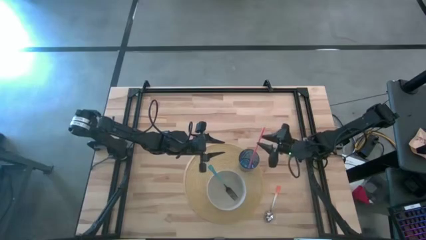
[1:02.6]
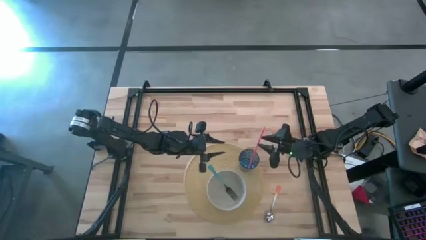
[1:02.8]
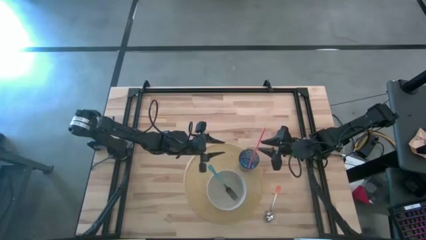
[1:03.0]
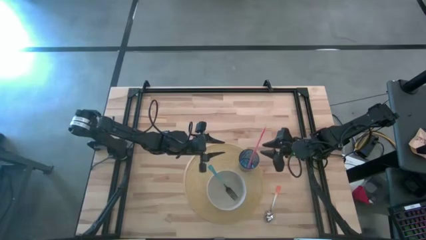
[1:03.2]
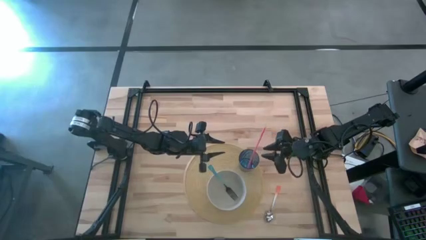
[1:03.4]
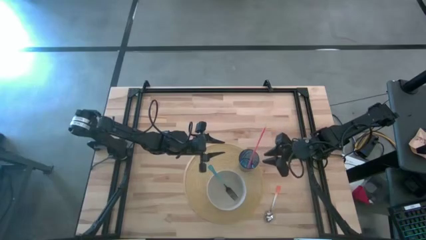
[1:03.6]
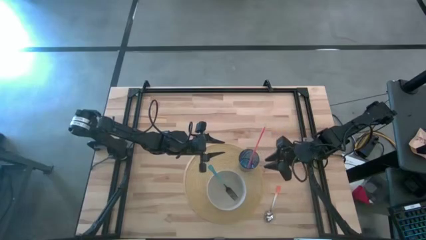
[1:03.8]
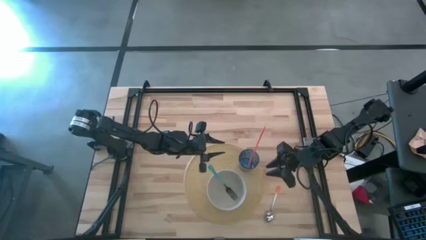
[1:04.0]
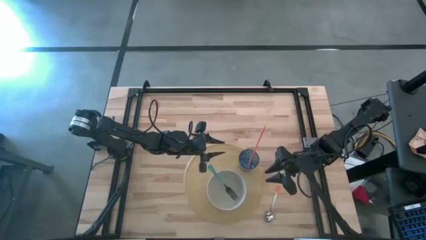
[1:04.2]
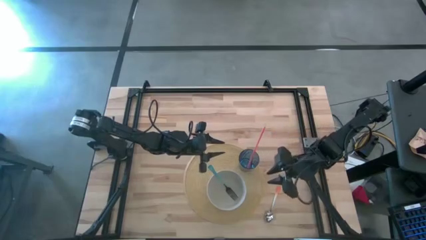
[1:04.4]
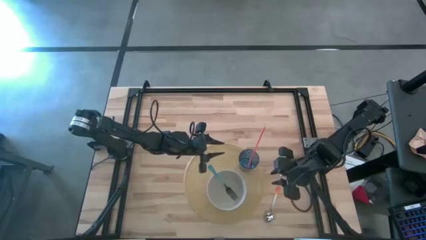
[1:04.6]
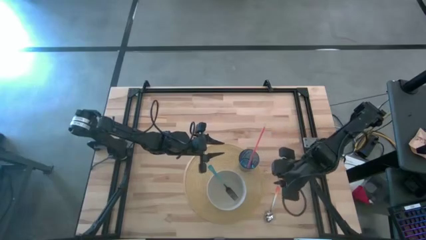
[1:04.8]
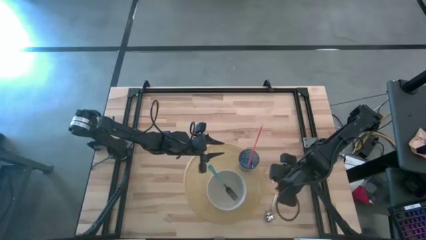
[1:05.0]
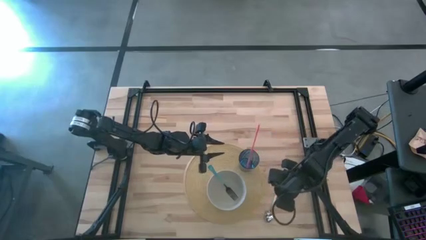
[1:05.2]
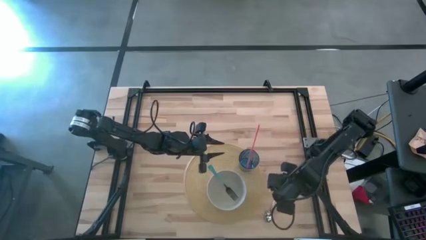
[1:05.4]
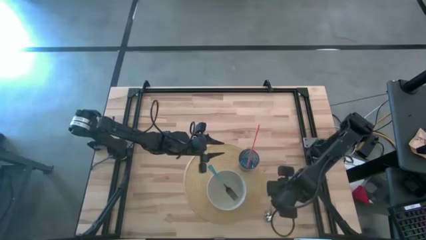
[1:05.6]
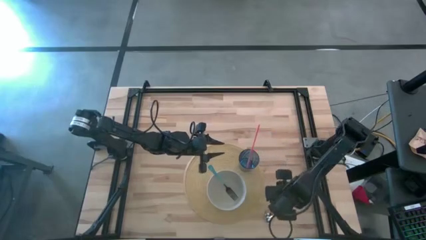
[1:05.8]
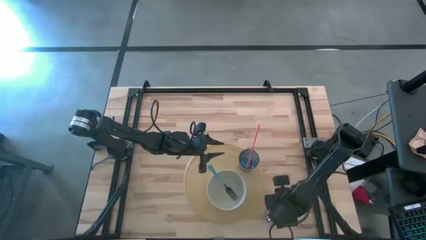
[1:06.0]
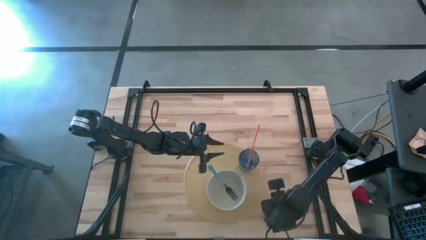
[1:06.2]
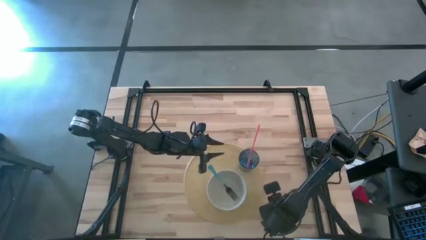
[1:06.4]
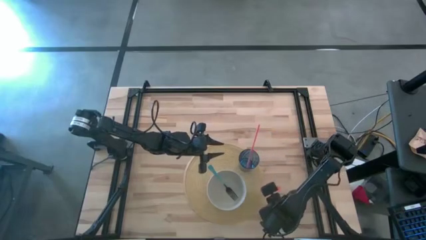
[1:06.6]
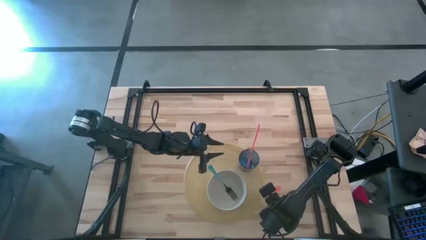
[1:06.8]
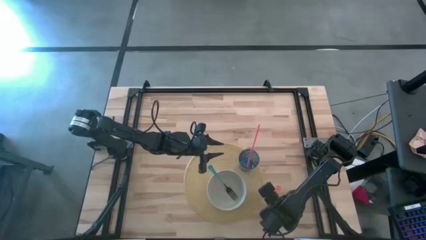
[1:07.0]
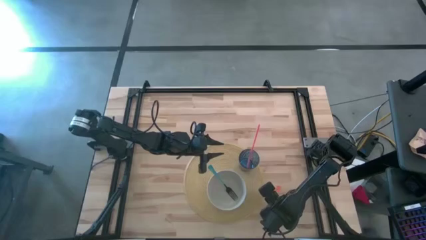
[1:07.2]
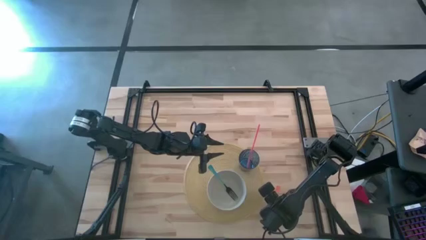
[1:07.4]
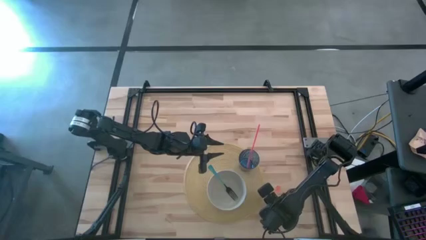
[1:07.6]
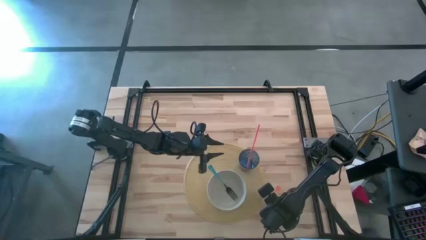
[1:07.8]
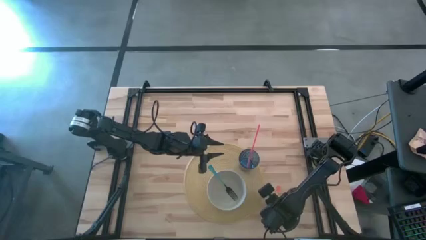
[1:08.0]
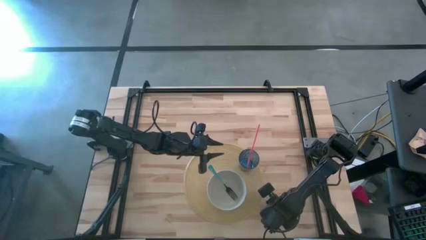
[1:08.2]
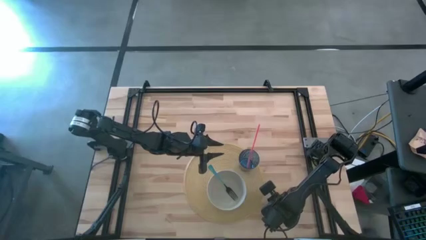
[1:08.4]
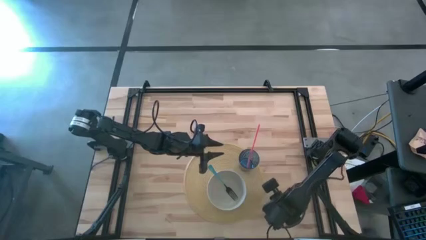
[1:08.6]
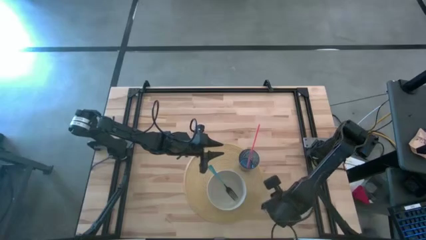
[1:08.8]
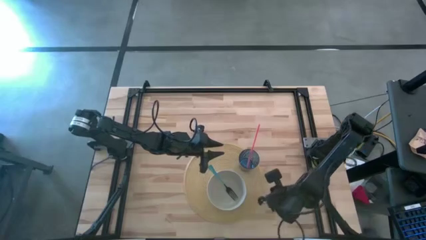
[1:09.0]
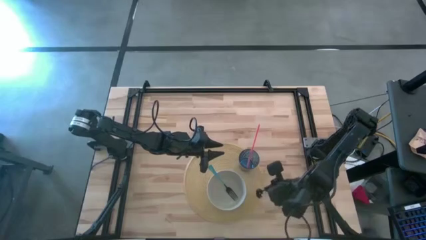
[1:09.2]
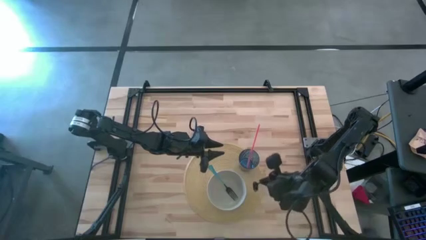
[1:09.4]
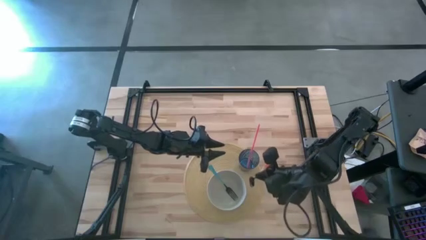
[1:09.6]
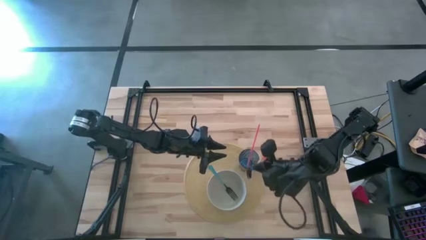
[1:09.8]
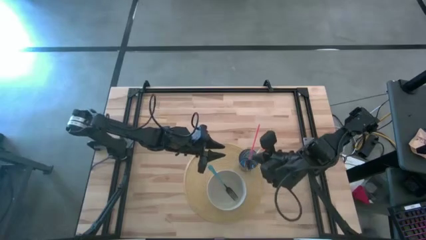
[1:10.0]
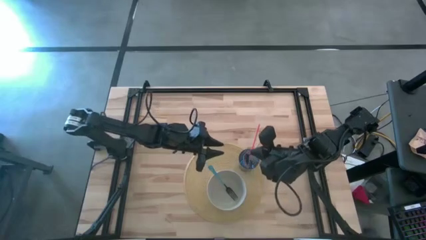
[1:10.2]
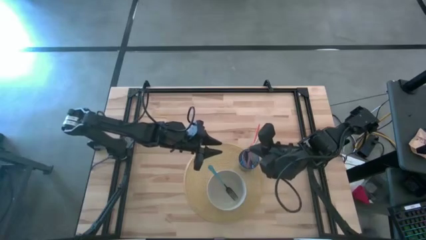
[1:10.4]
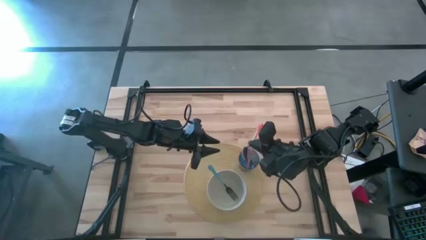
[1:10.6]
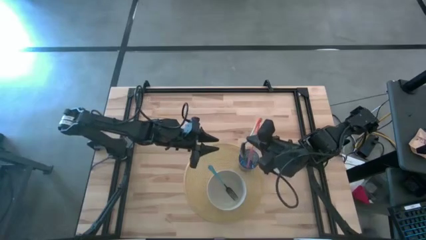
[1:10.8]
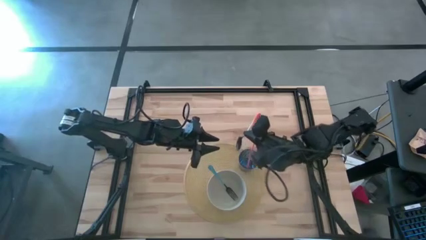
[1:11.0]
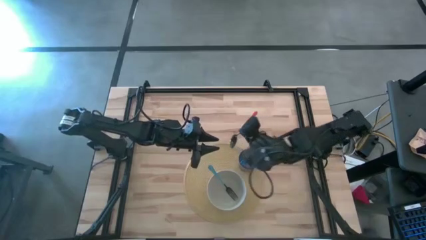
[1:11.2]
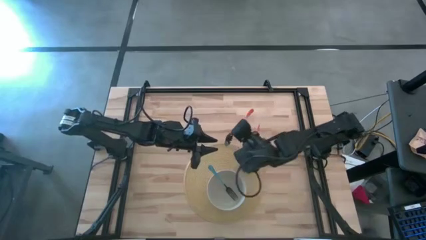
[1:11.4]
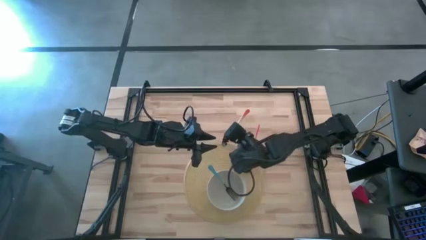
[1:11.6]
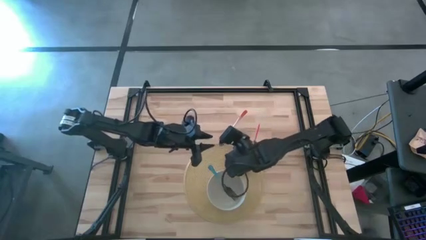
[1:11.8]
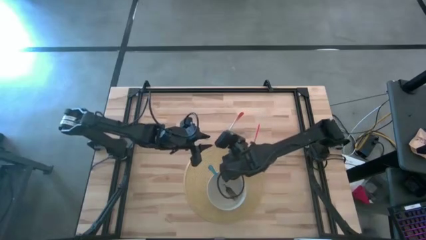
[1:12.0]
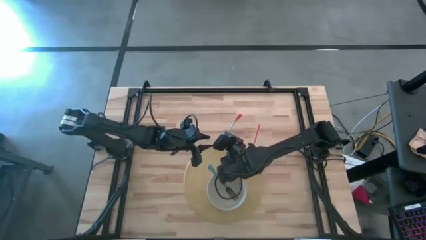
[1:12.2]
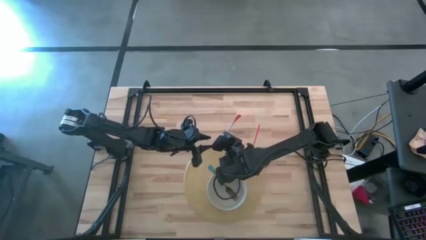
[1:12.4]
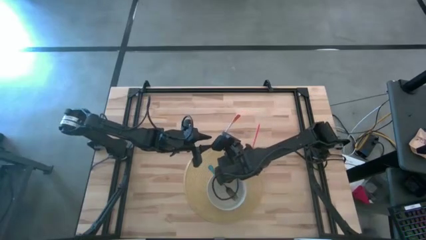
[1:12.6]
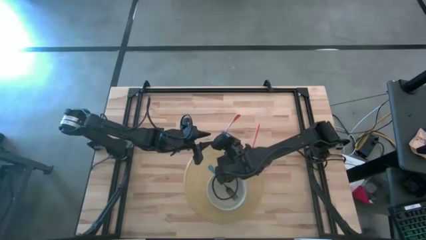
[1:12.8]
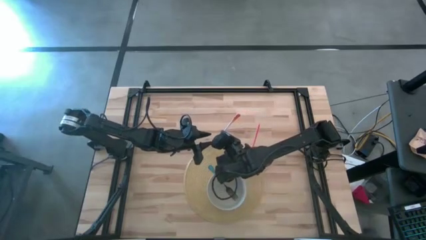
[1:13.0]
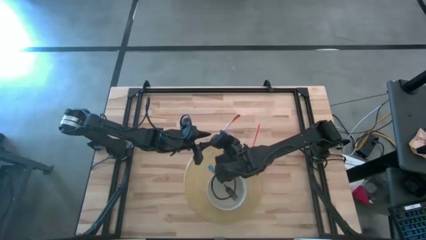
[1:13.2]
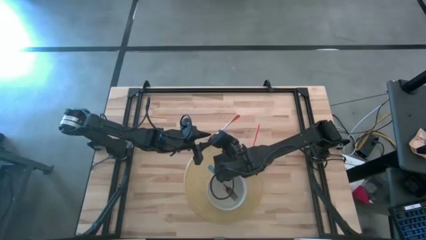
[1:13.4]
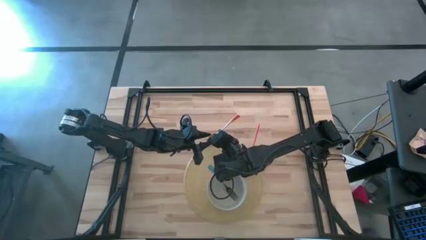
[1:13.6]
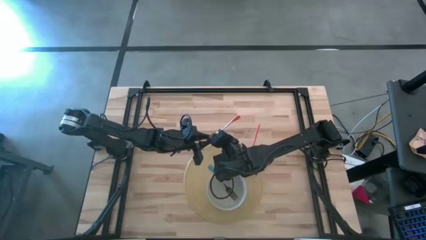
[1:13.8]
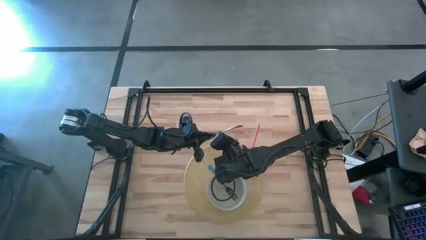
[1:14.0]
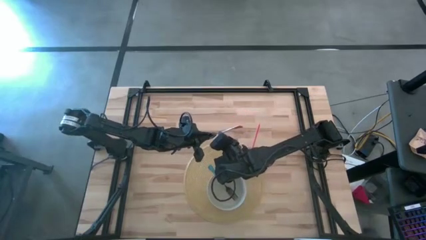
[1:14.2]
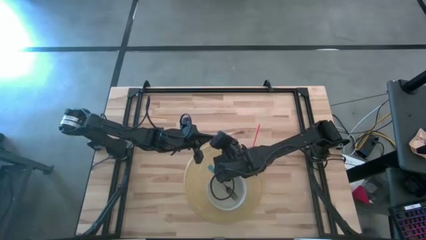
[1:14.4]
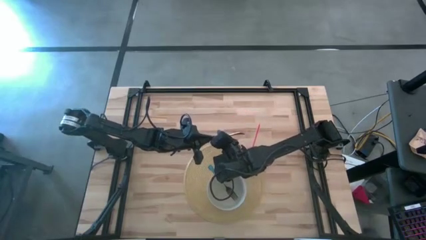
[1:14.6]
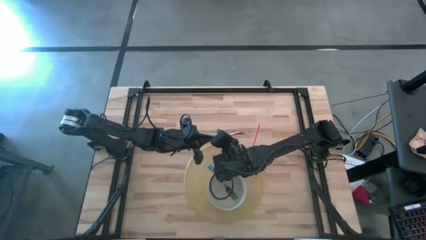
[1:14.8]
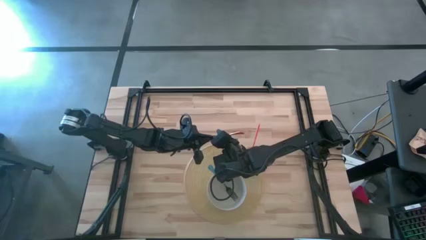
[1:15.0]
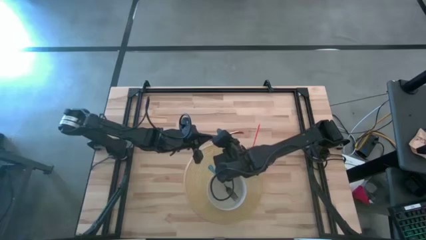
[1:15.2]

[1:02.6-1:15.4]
Task: Pick & Place Utensil
Put the orange spoon into the white bowl on the brown mat
